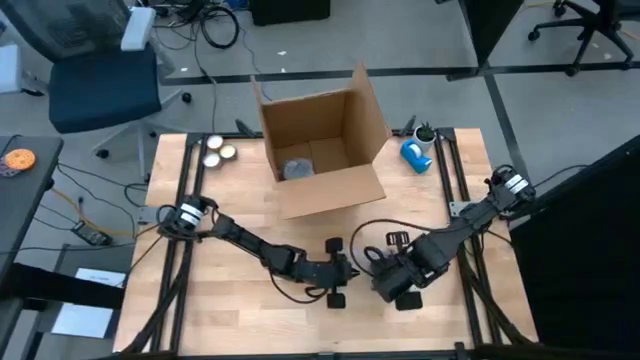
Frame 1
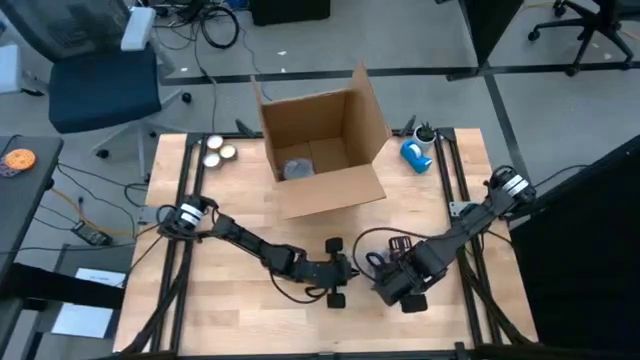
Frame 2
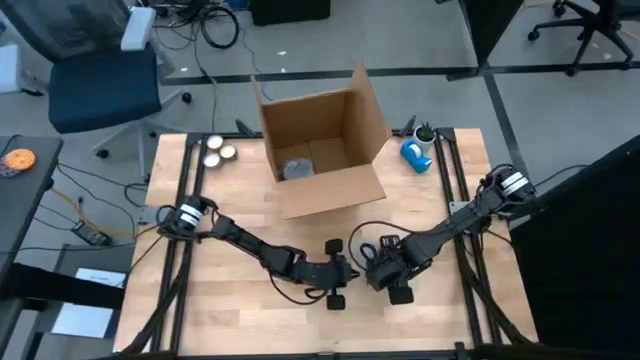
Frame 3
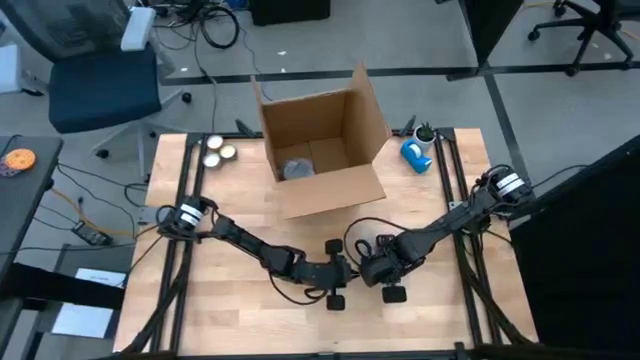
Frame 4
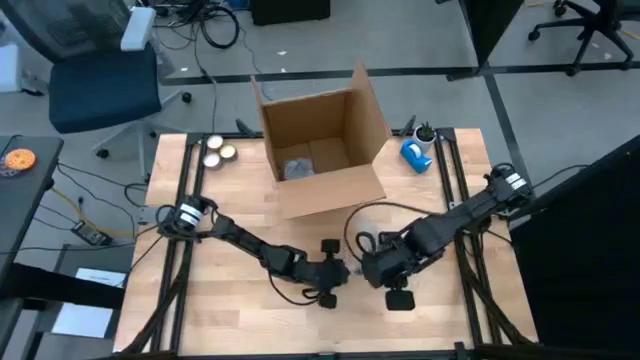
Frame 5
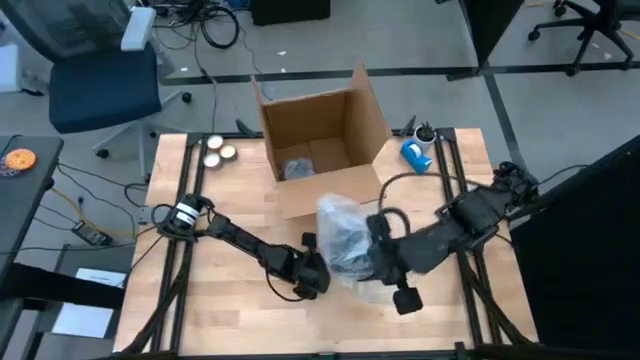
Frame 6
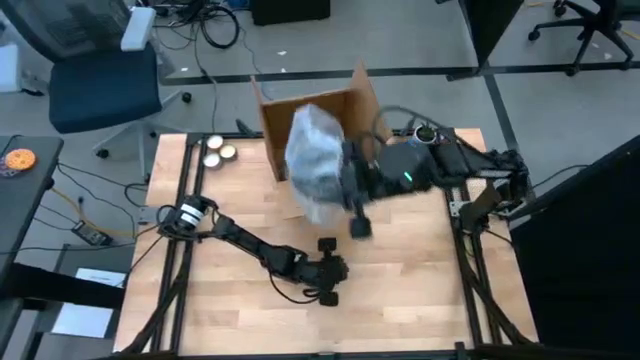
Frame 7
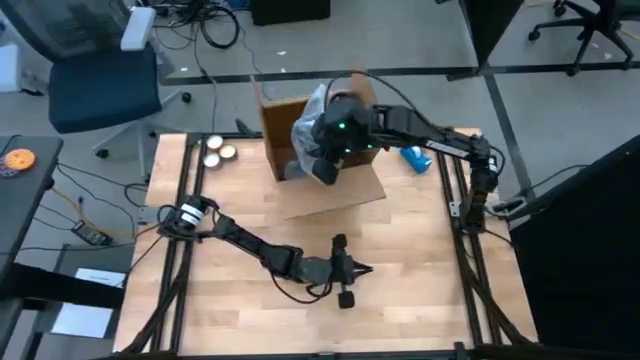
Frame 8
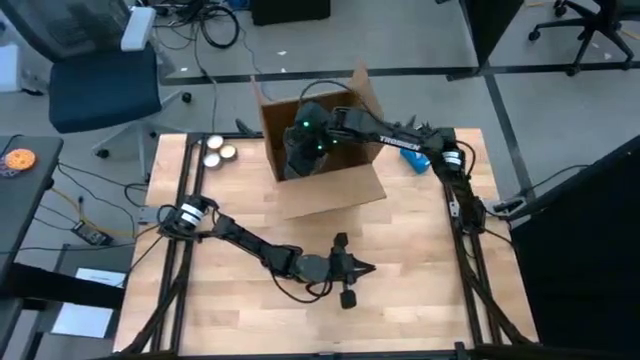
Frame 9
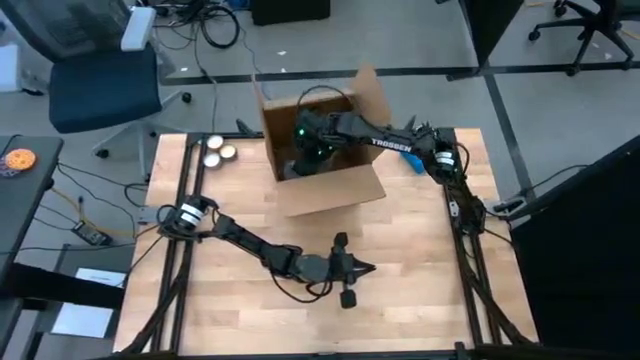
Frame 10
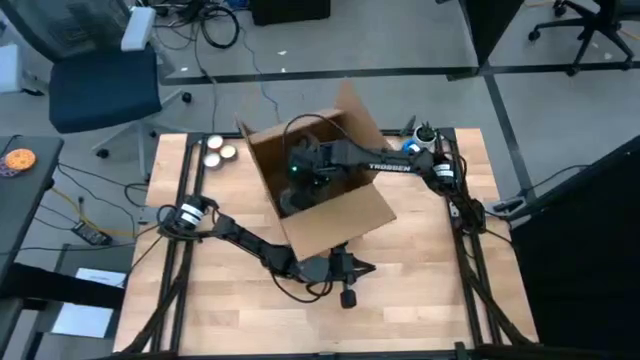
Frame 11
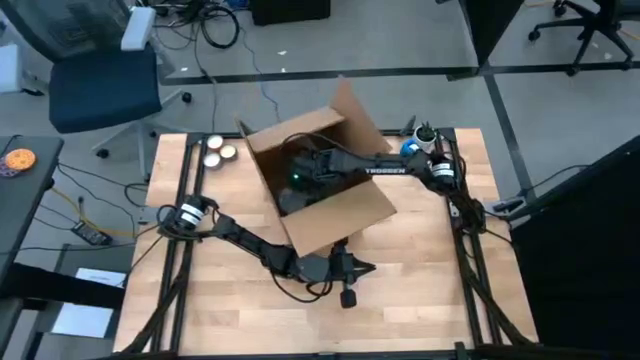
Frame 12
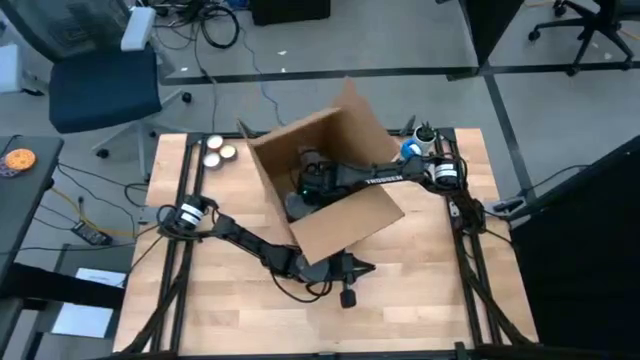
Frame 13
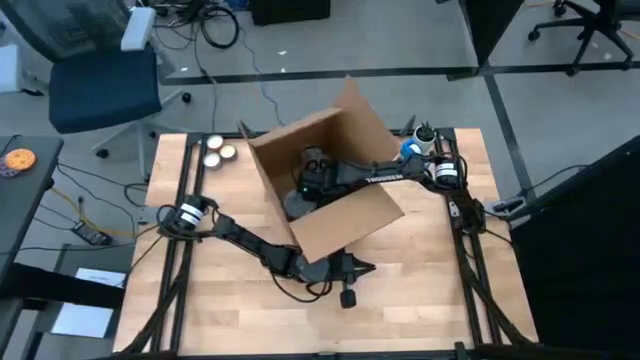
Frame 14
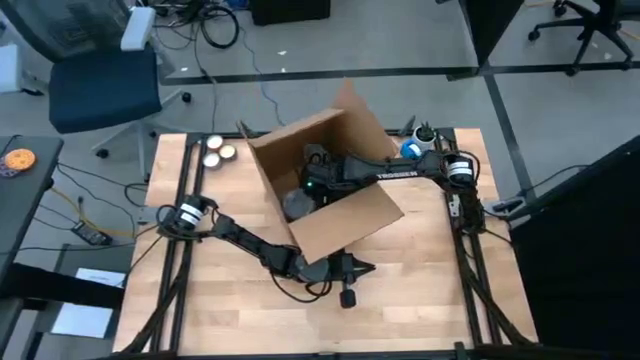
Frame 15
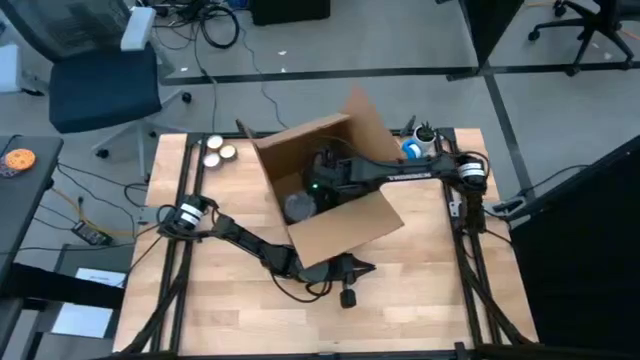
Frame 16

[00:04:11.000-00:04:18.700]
Task: wrap mug
Put the wrapped black mug into the cardboard box

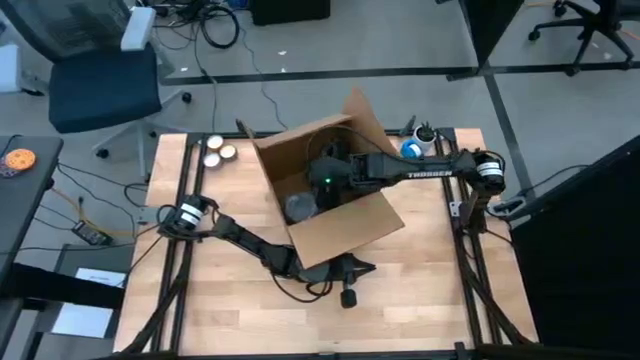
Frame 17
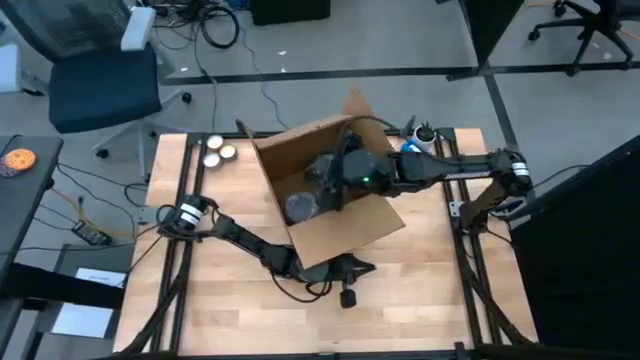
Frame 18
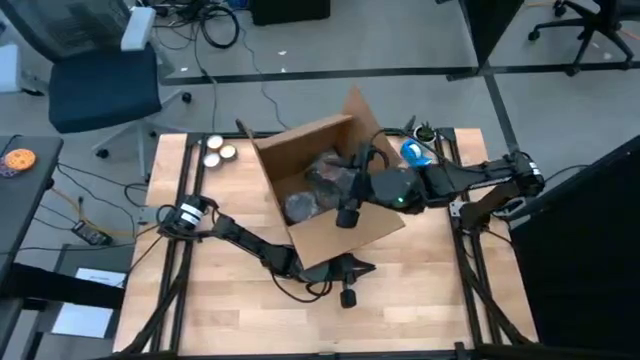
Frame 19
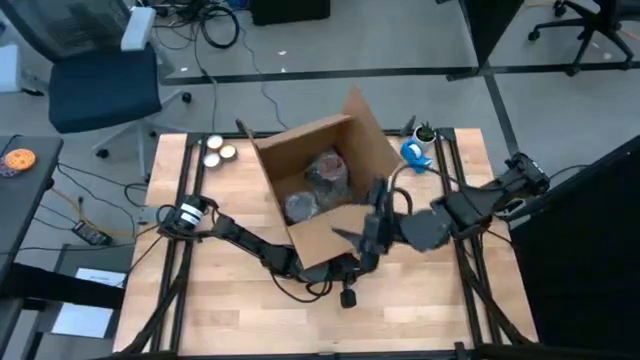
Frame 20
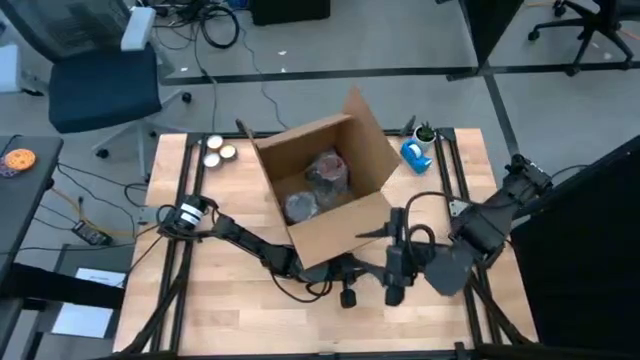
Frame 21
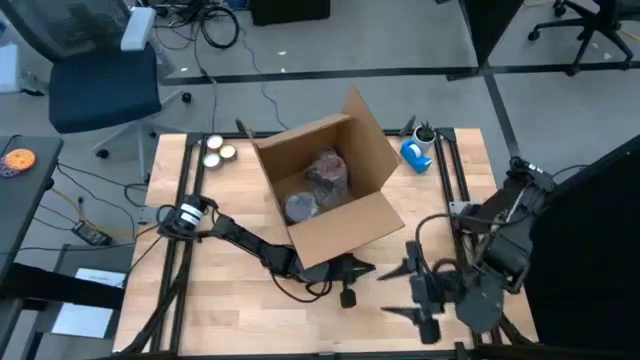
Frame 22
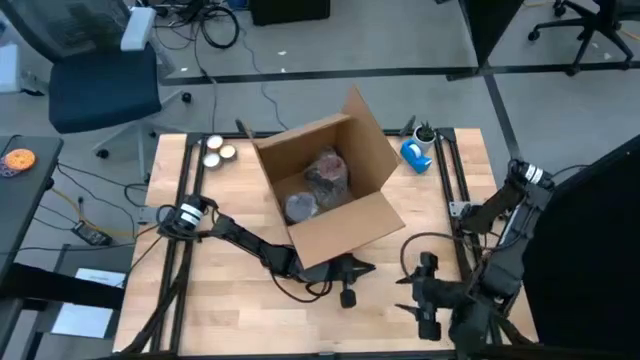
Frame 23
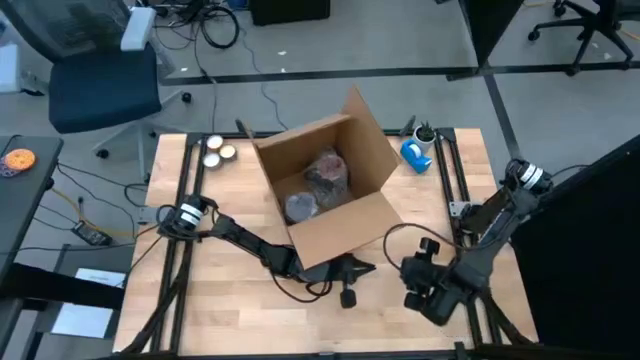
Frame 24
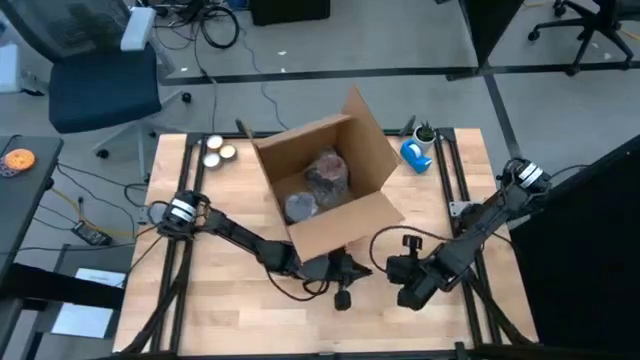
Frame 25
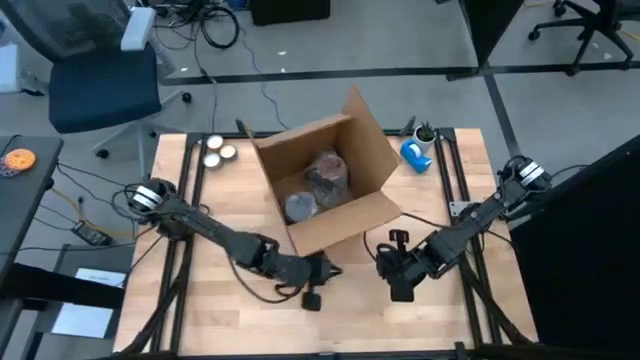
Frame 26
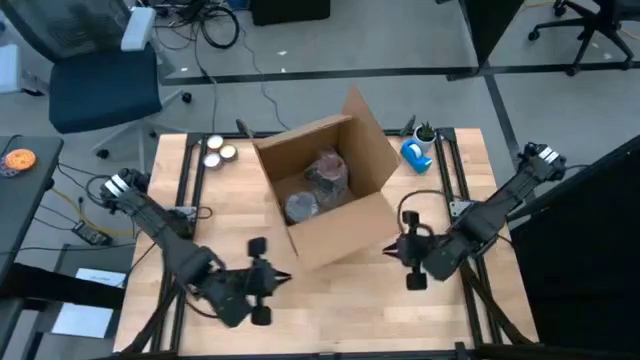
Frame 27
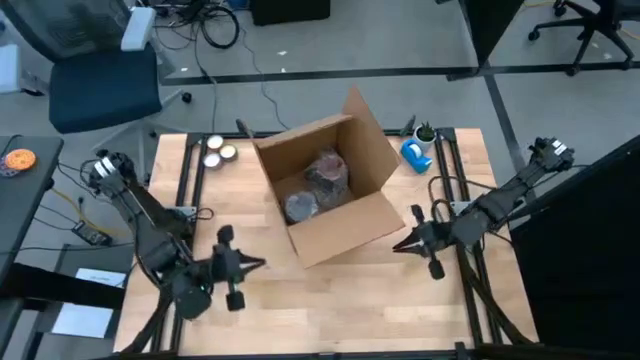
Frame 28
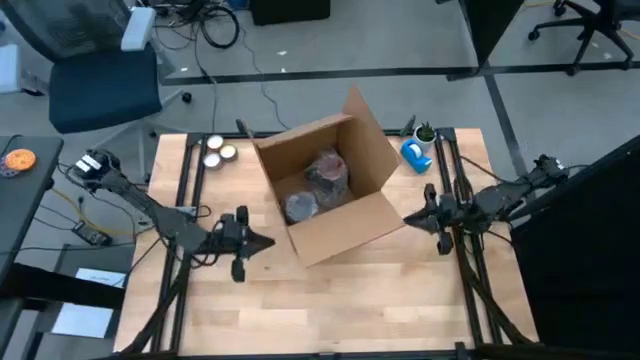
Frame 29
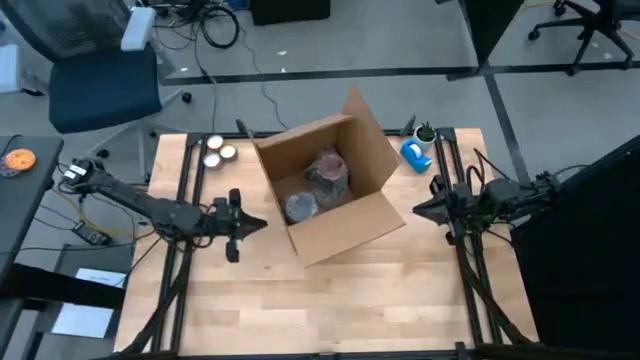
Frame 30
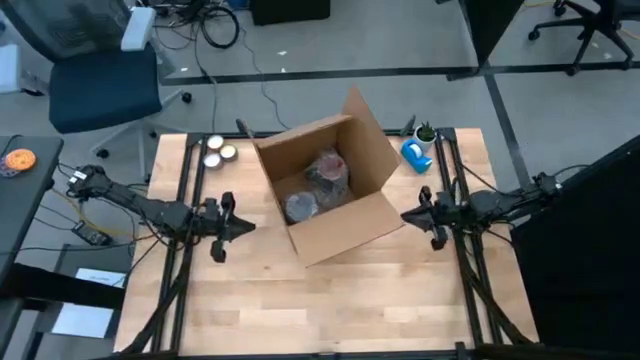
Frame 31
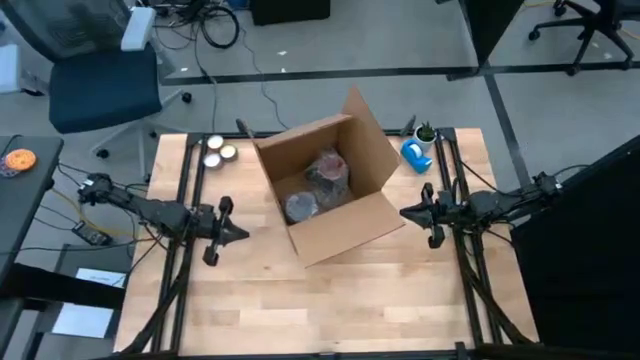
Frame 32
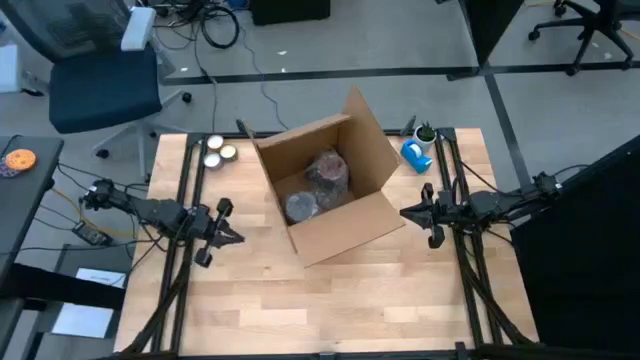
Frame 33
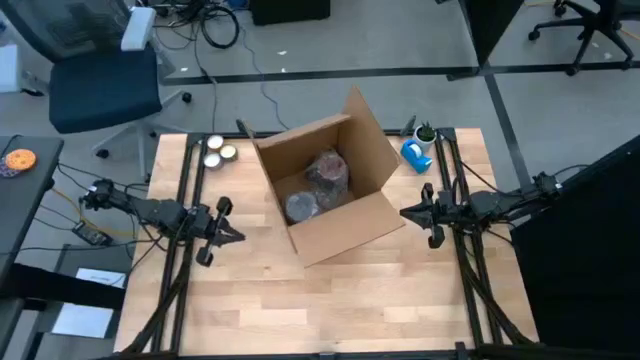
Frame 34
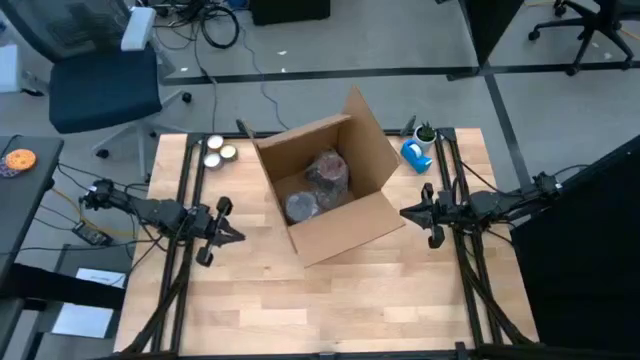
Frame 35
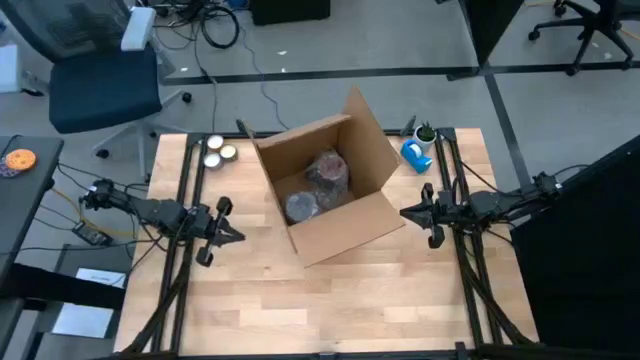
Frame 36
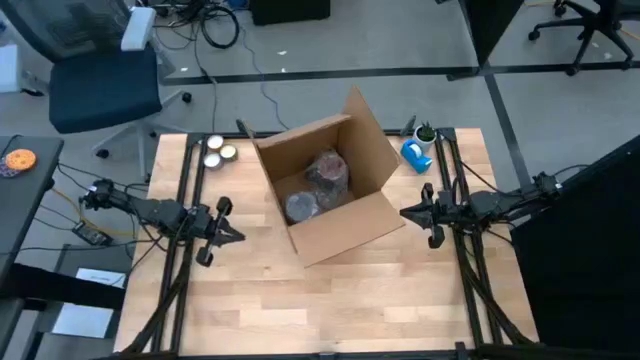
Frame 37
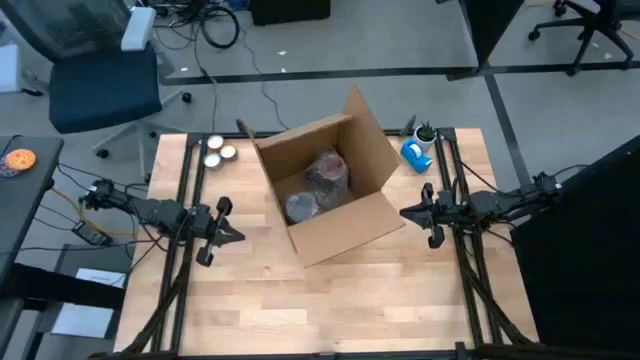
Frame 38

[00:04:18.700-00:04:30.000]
Return to Home Position
